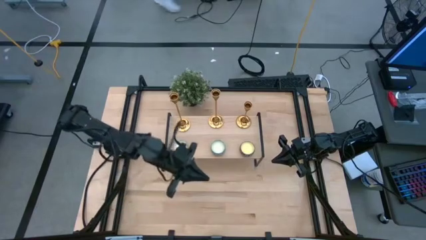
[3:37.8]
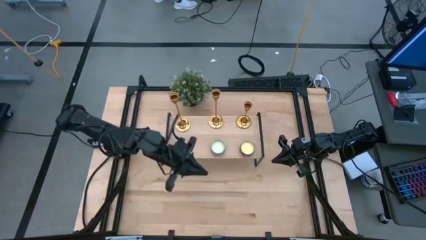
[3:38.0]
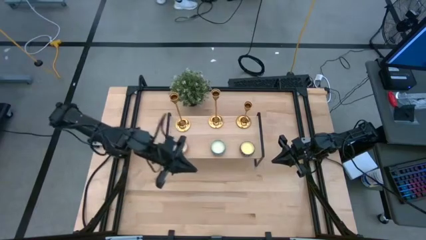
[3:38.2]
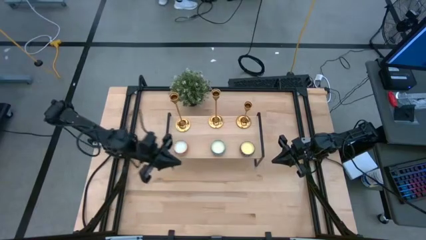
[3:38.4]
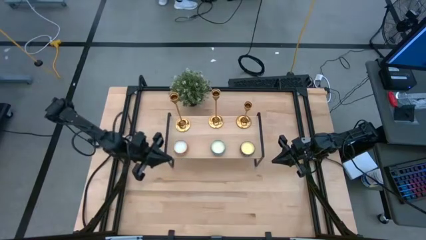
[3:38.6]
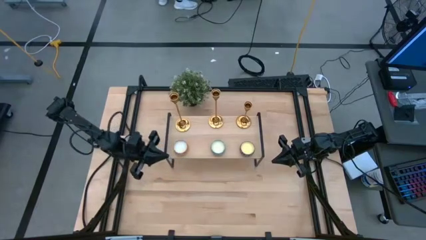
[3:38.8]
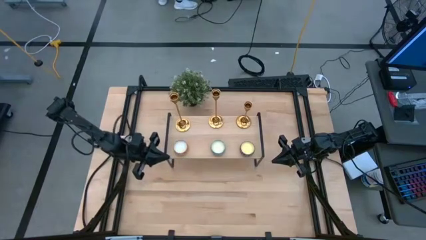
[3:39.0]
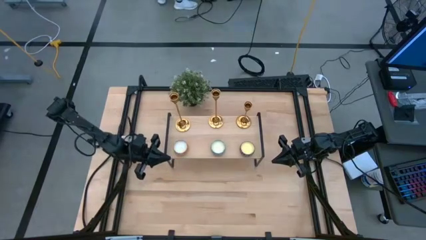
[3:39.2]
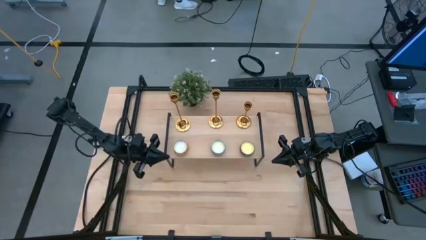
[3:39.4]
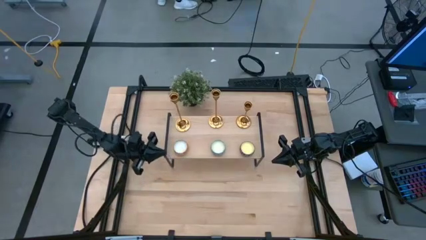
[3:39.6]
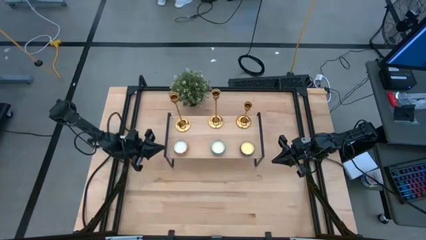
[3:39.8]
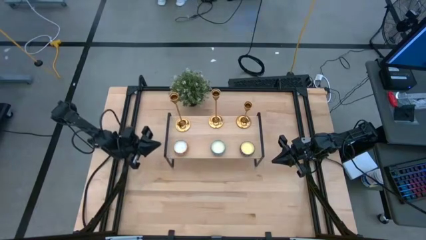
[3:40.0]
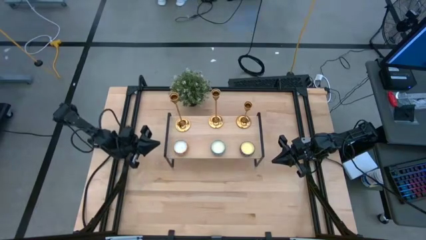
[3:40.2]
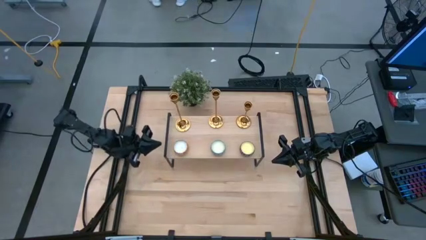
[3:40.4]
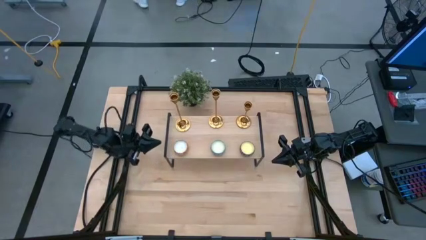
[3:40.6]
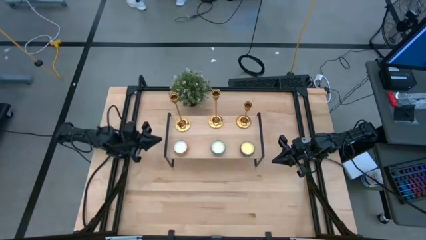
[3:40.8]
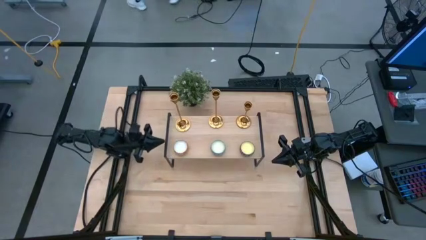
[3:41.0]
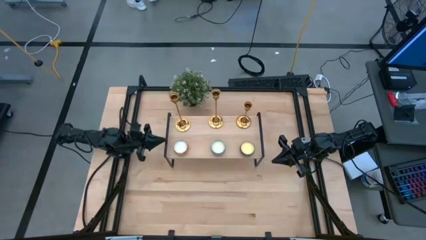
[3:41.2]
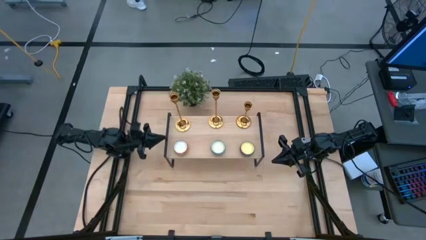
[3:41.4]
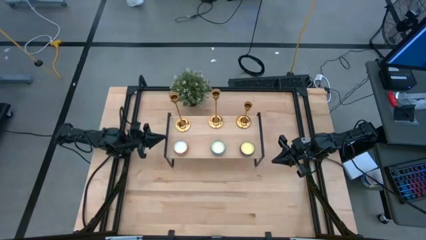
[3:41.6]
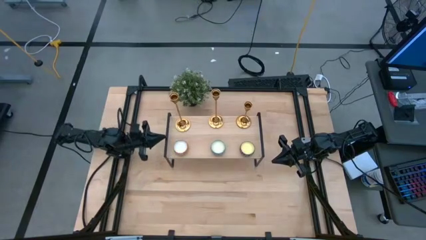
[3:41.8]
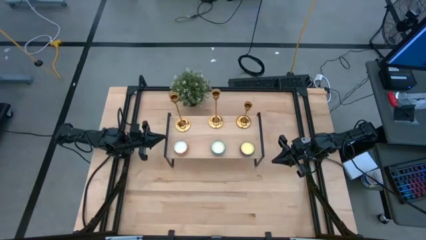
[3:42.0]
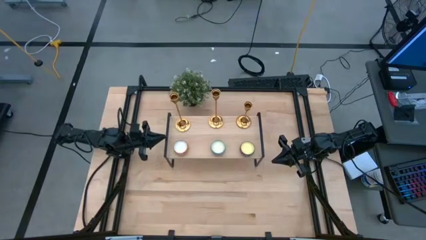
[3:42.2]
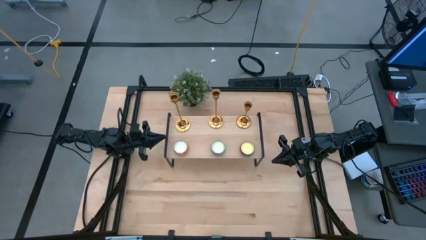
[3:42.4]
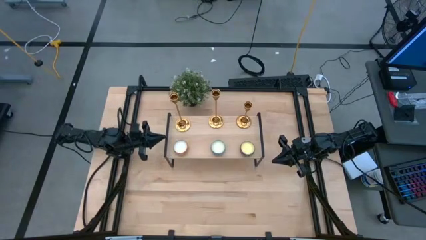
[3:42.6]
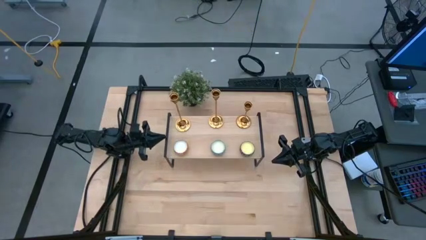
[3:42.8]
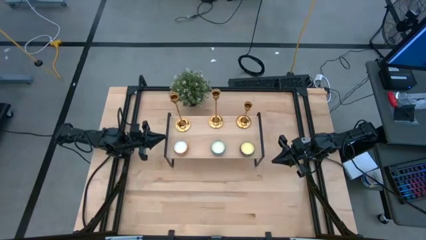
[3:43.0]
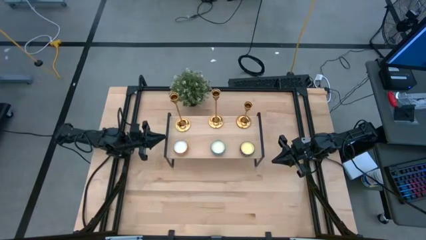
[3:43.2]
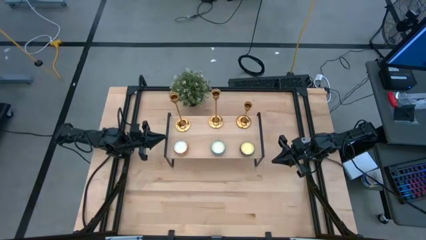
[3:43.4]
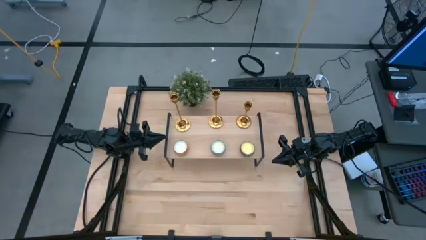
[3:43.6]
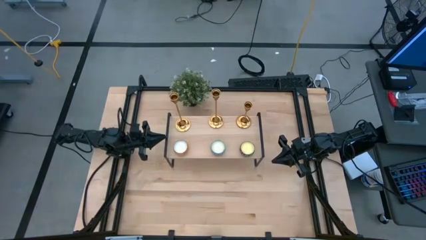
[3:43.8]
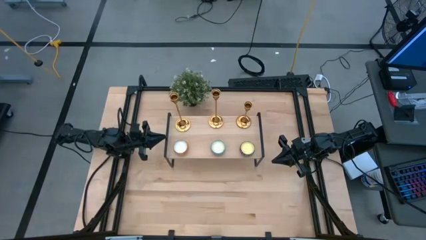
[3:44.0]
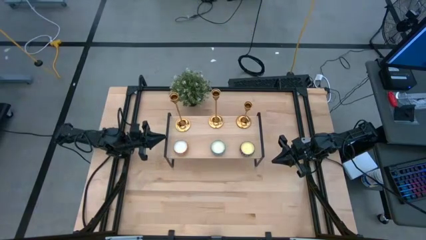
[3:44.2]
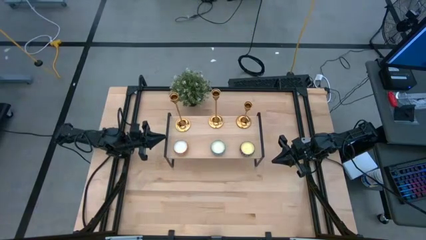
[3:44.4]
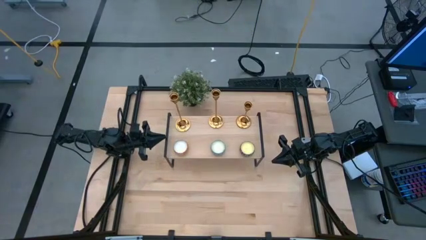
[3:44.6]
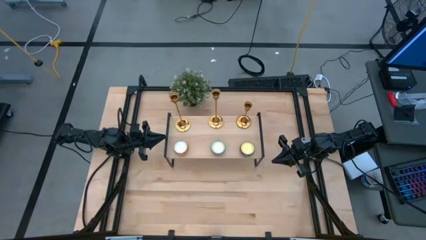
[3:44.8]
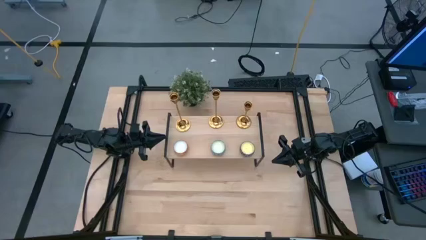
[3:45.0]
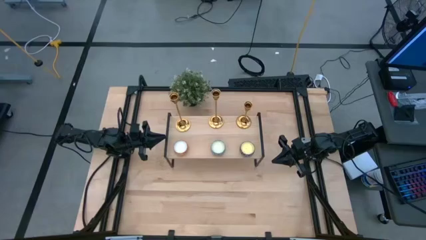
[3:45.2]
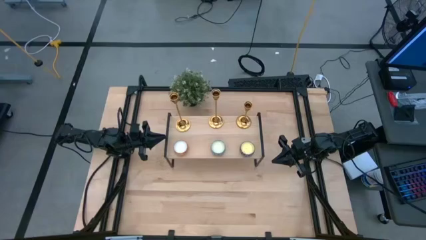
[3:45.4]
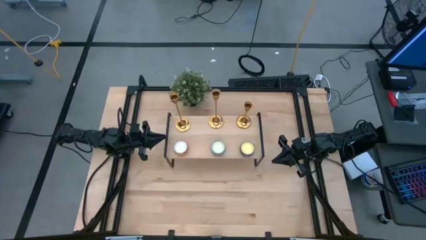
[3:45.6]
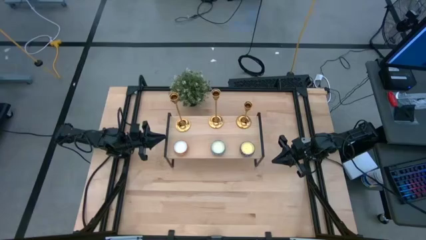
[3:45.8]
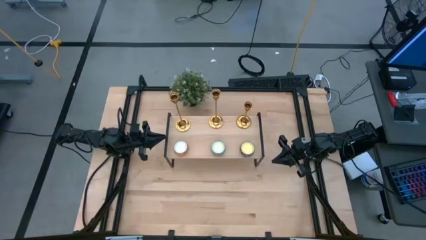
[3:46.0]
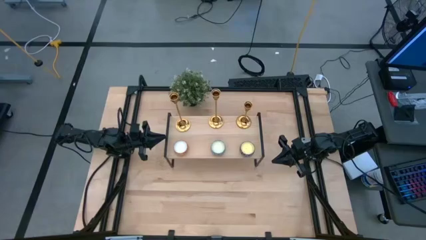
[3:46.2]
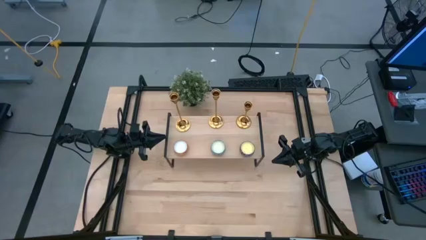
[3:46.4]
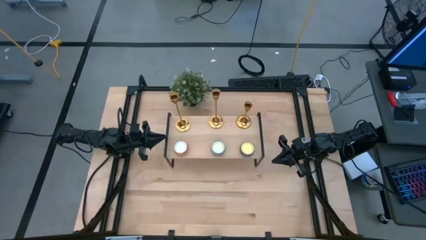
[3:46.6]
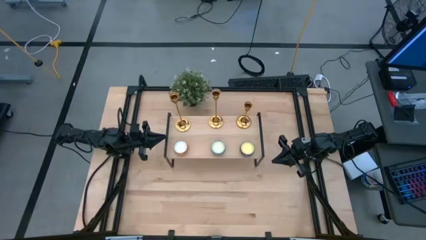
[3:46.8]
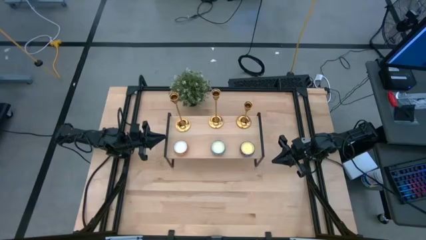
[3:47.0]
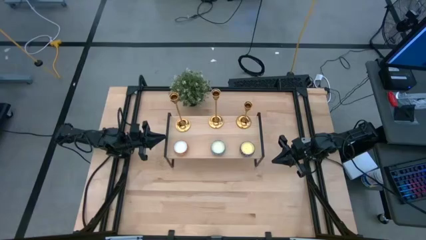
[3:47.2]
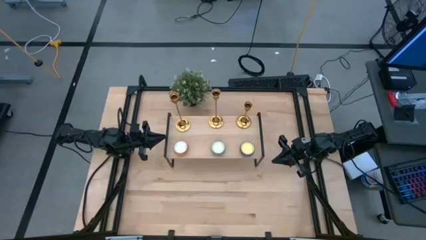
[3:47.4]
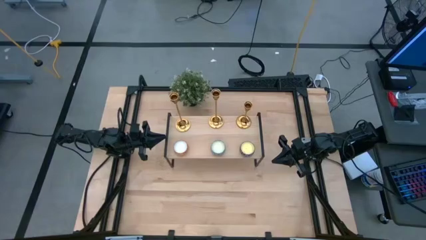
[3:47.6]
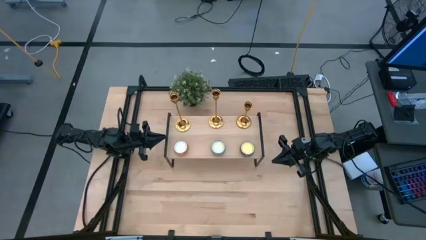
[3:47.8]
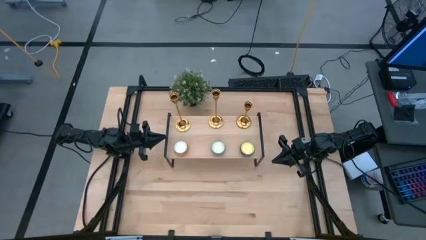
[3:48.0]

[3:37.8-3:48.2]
Task: Stock candles and holders on shelf
Return to Home Position
